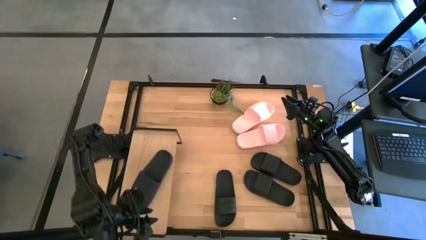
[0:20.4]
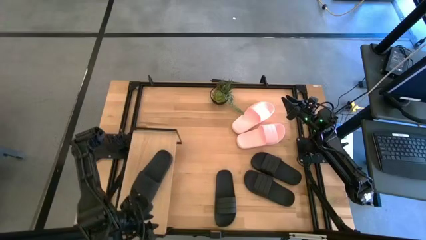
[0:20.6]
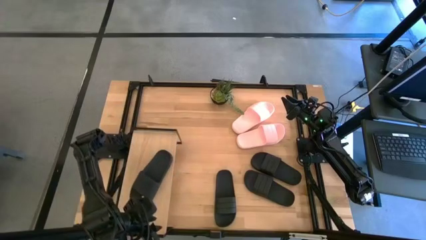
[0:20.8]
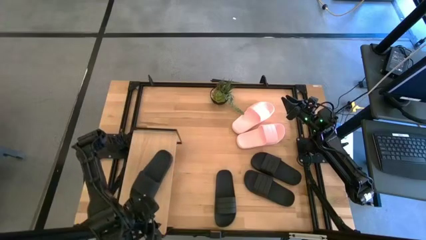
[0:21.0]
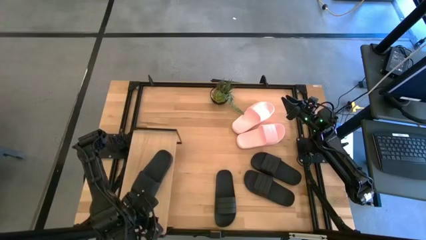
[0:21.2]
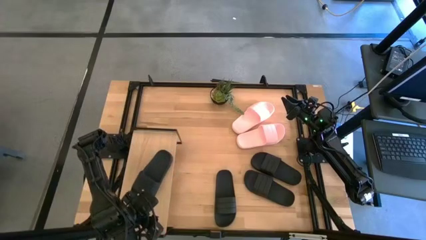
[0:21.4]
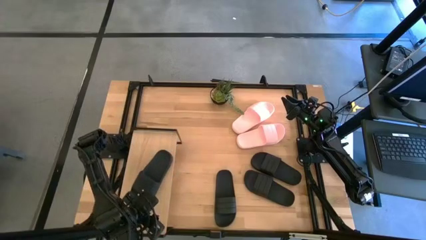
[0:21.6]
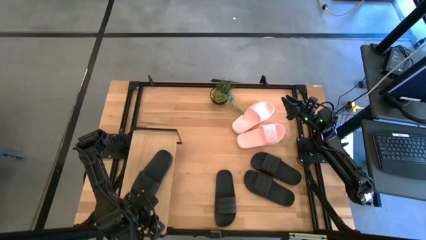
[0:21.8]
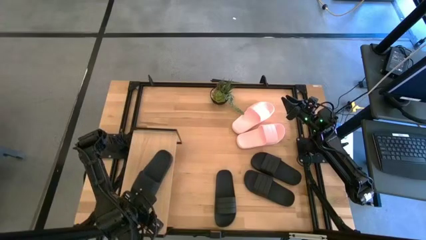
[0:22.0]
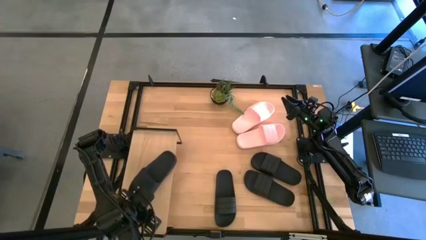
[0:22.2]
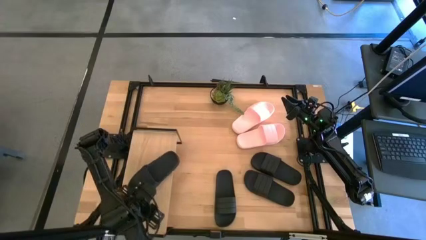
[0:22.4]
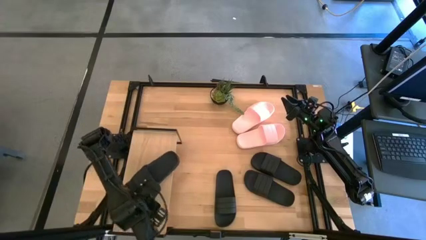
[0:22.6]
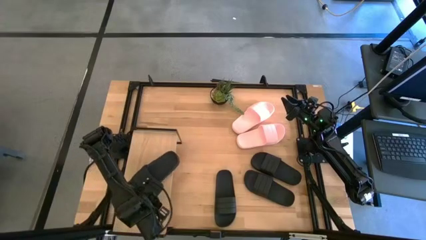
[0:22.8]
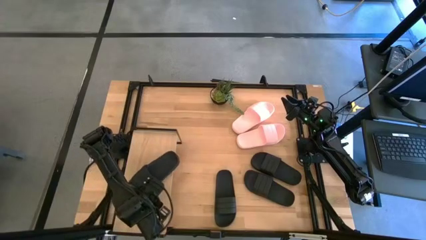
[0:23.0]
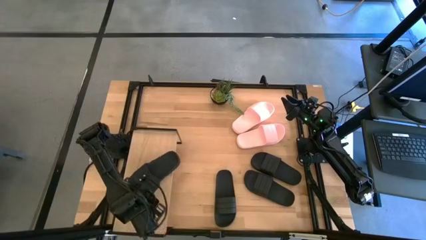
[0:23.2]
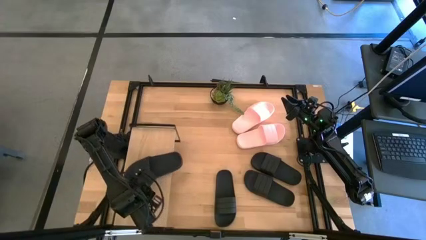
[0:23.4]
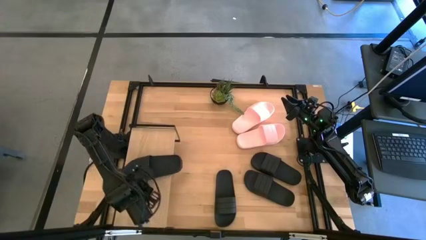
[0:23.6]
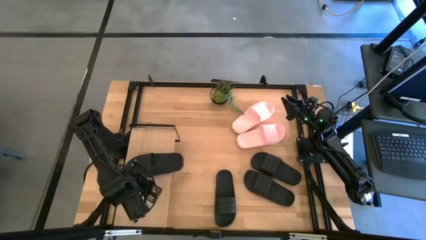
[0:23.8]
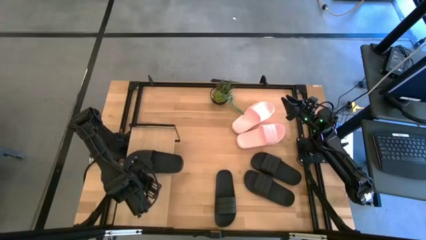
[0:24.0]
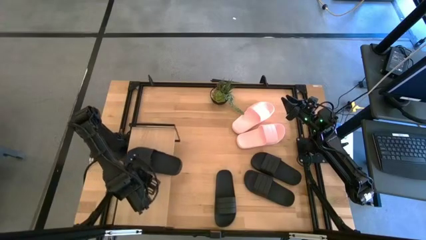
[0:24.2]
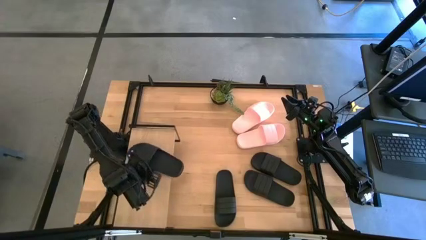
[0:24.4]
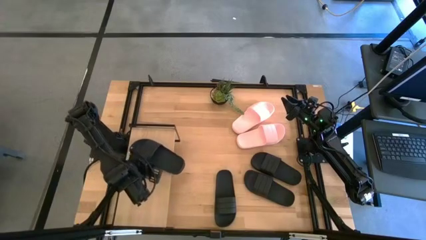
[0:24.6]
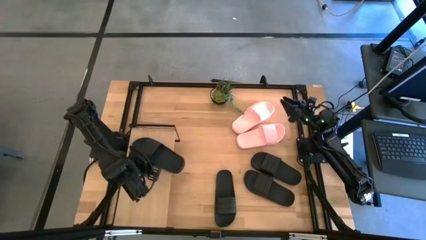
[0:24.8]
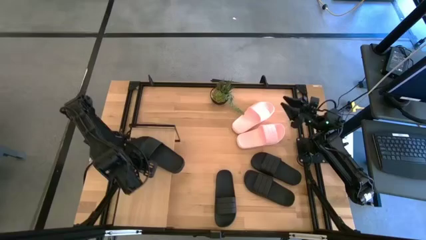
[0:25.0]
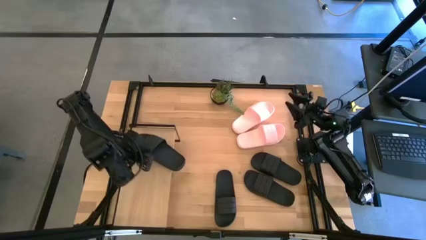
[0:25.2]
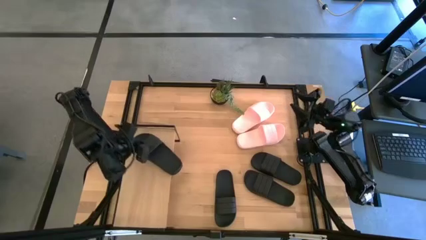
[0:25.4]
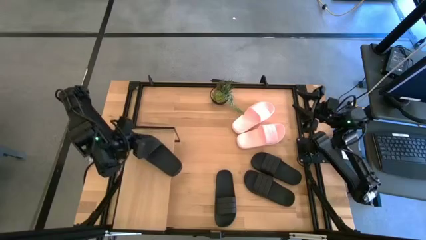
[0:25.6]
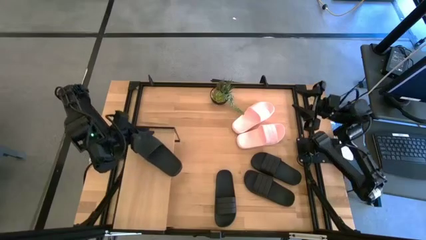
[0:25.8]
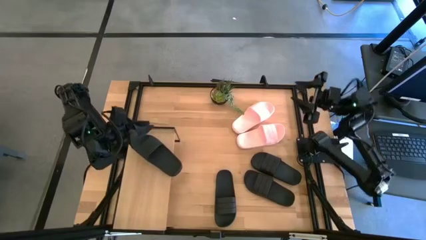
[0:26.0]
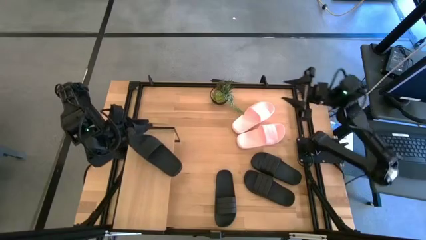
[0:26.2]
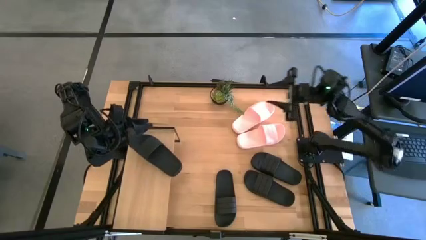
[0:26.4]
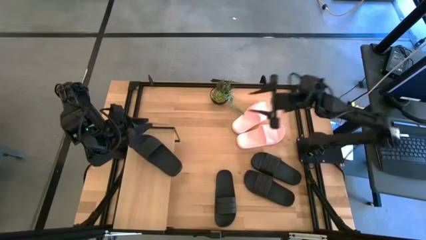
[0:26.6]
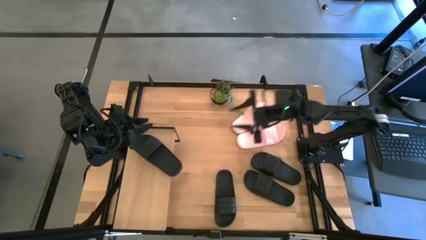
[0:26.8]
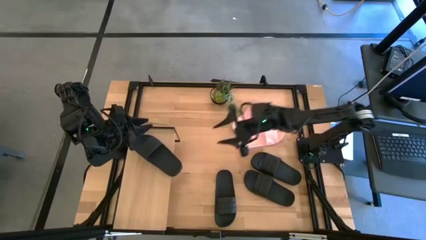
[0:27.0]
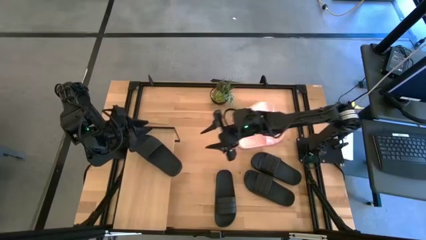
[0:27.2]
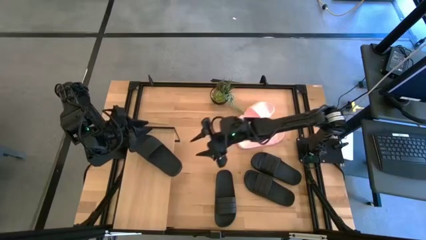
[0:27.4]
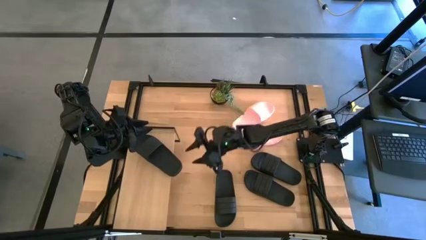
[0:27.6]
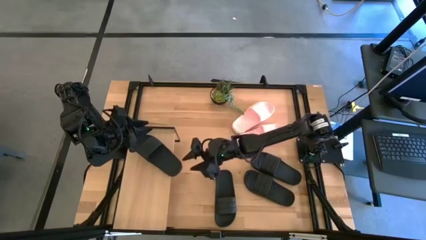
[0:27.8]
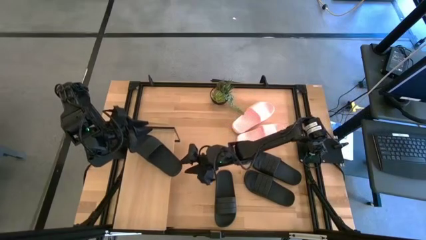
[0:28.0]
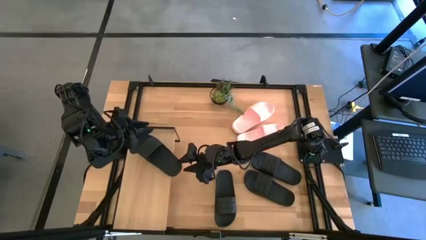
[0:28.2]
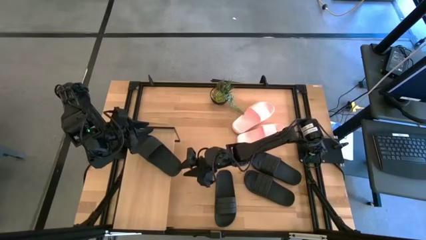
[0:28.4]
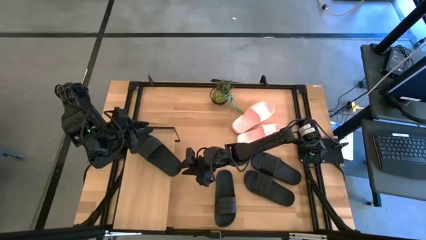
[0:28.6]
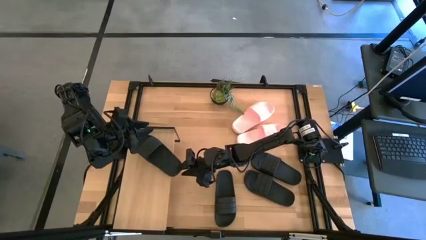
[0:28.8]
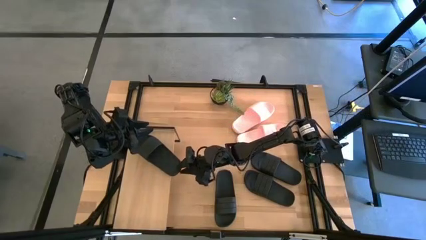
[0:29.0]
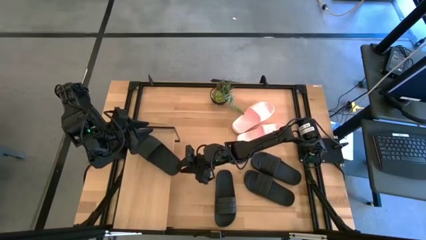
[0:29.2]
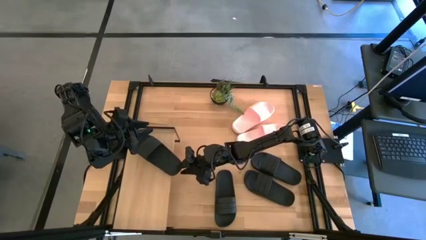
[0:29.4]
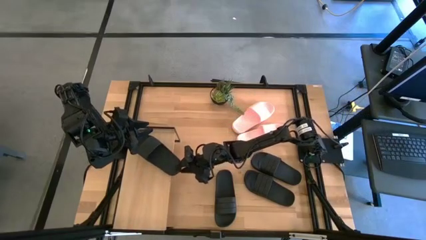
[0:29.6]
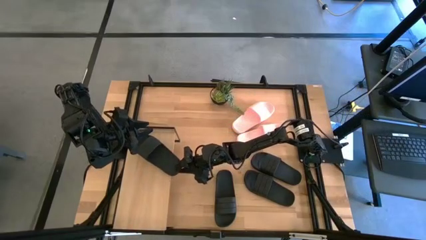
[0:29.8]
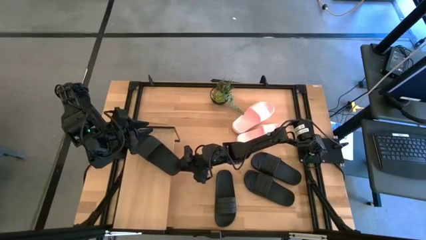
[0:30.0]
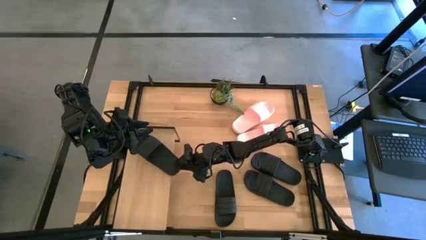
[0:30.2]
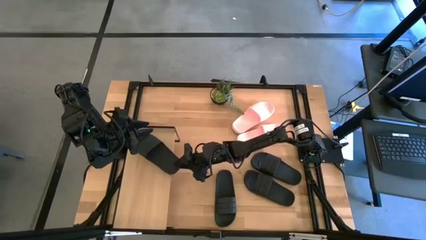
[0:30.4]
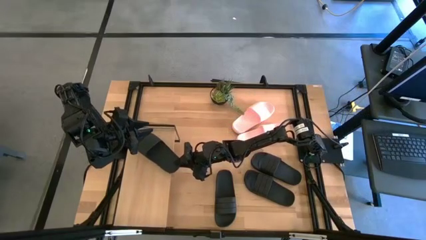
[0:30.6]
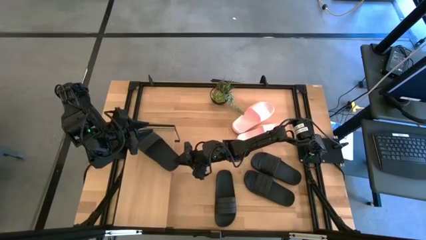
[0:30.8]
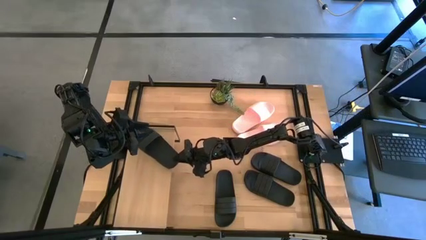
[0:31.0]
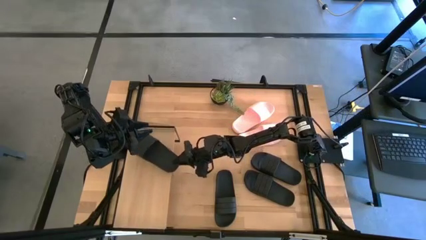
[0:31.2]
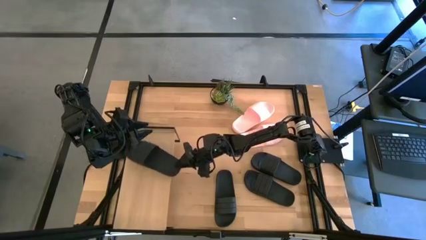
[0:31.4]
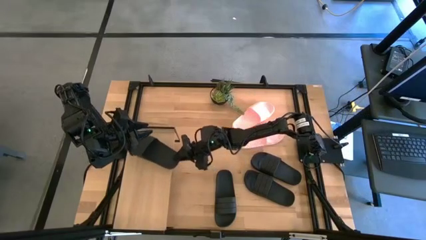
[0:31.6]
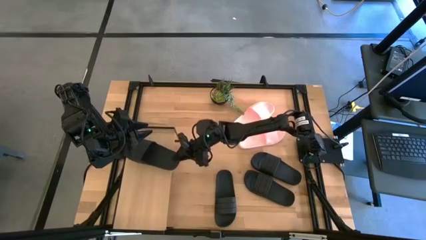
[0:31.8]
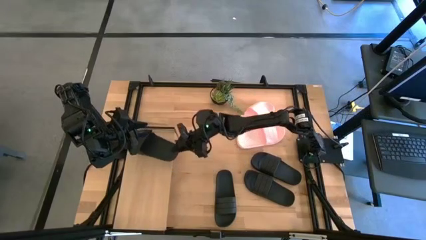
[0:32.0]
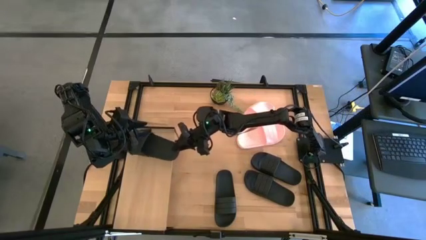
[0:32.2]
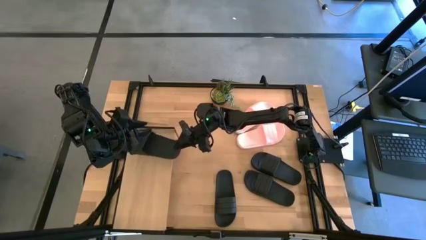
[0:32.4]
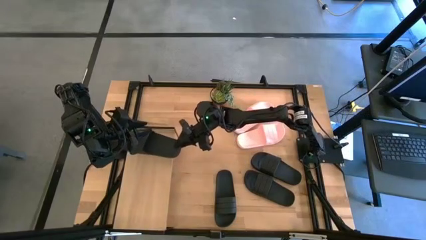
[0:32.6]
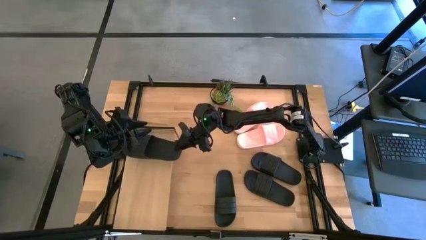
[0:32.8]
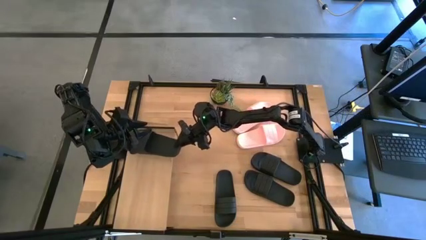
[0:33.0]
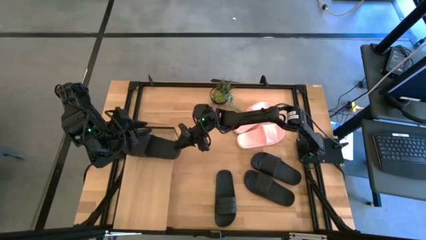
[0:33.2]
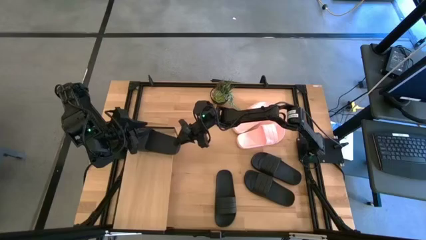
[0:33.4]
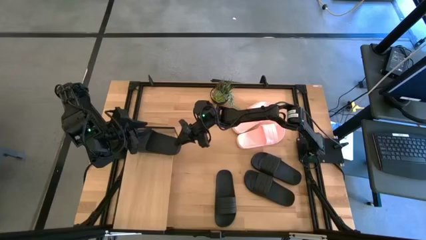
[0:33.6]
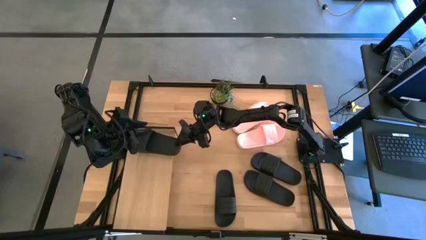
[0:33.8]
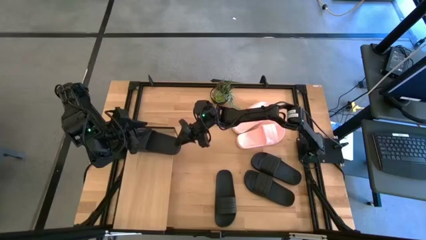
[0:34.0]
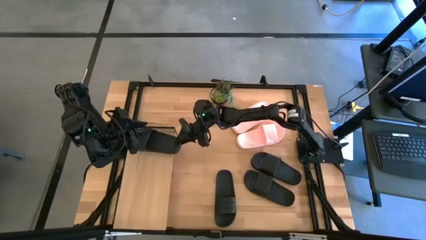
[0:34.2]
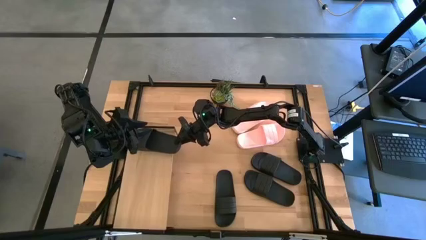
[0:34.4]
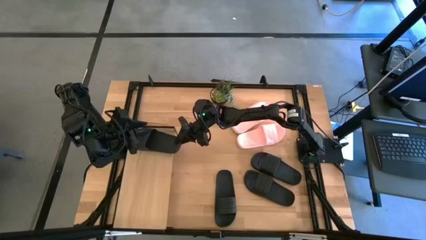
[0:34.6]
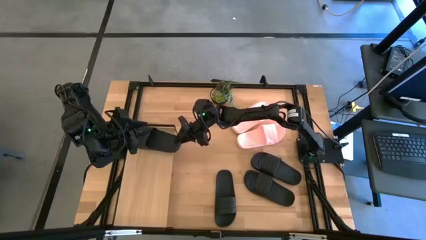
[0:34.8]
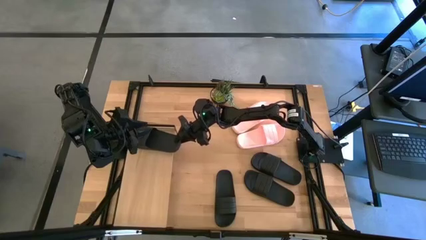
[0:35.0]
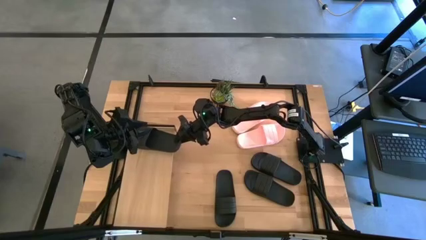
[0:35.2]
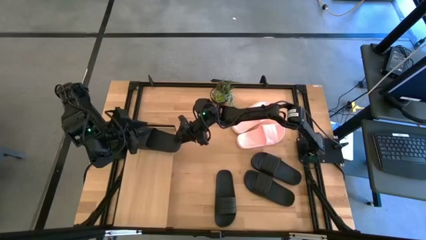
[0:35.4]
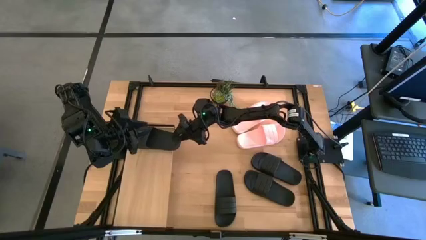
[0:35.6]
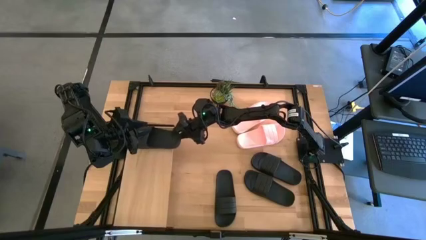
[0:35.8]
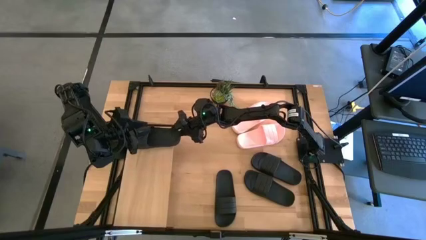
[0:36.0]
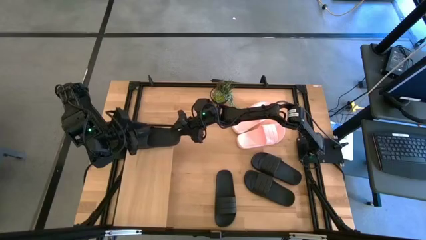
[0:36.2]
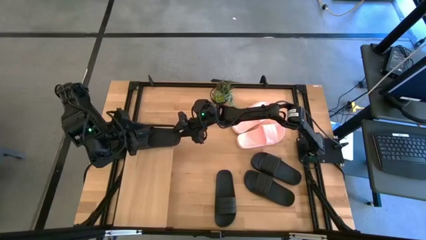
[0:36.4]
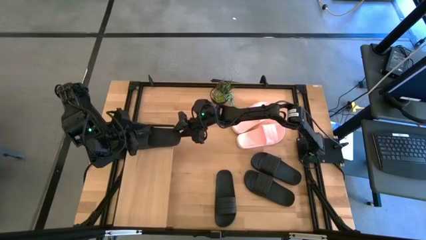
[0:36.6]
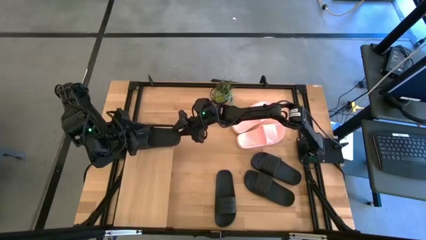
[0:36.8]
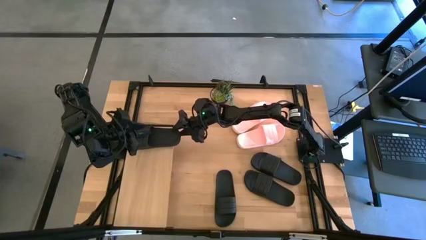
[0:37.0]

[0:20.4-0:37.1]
Task: Pick and place slides into the shelf
Put the black slipper on the shelf
